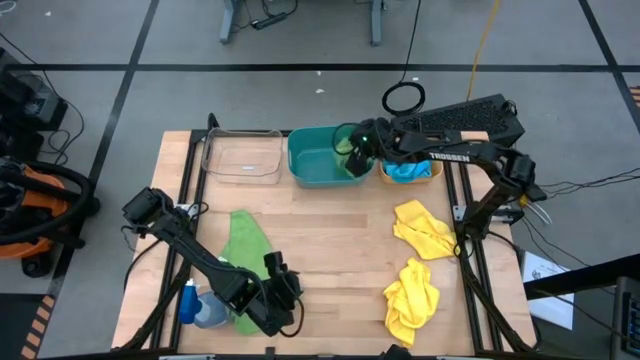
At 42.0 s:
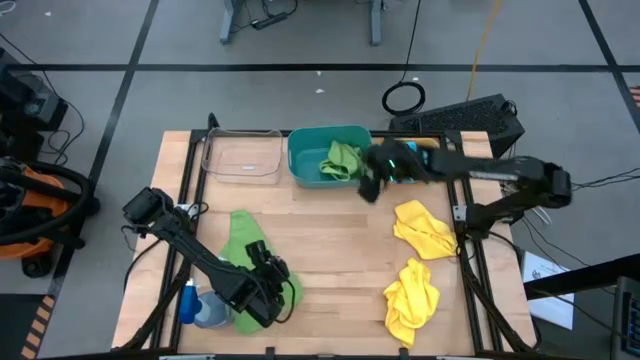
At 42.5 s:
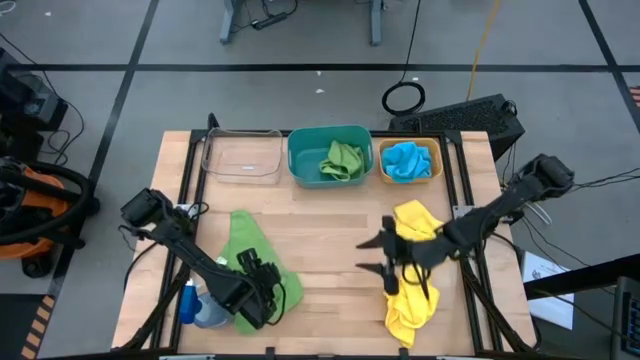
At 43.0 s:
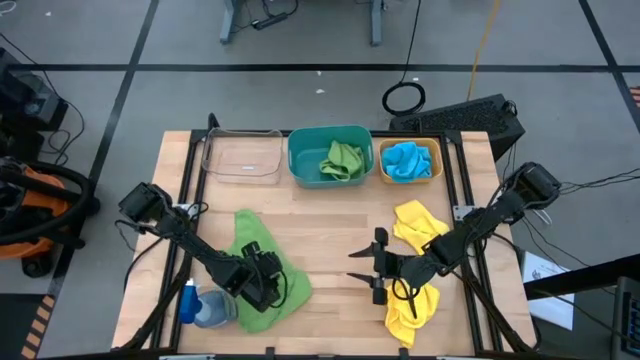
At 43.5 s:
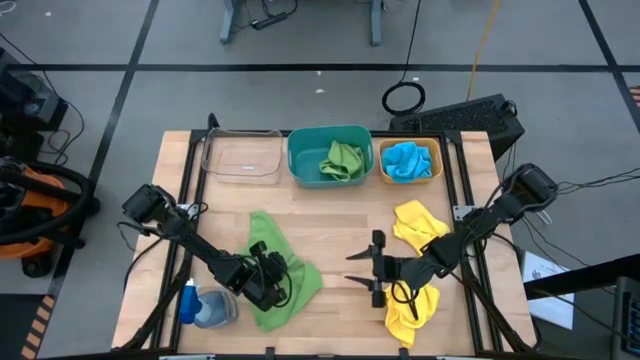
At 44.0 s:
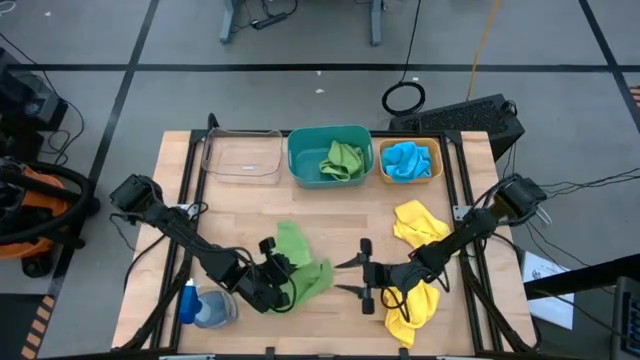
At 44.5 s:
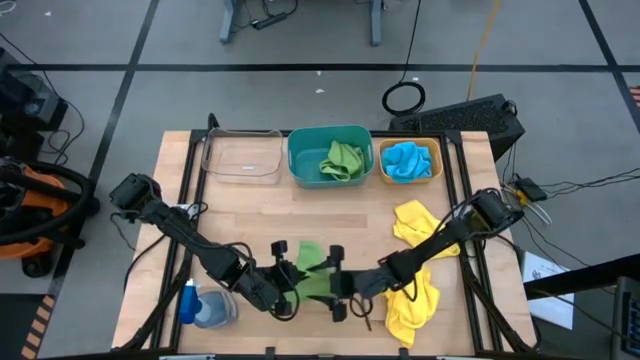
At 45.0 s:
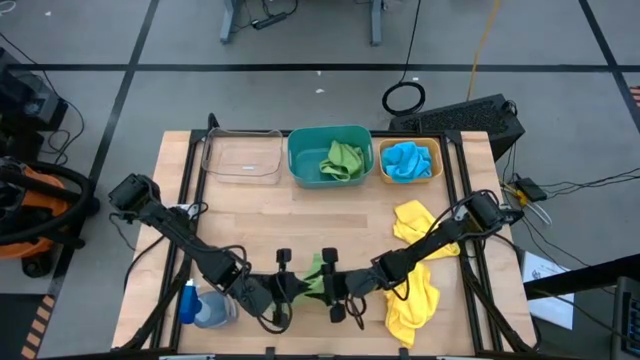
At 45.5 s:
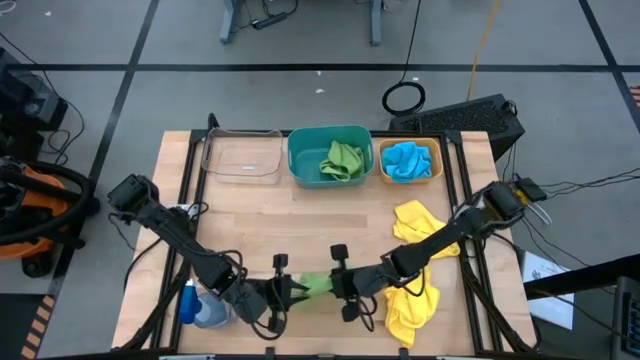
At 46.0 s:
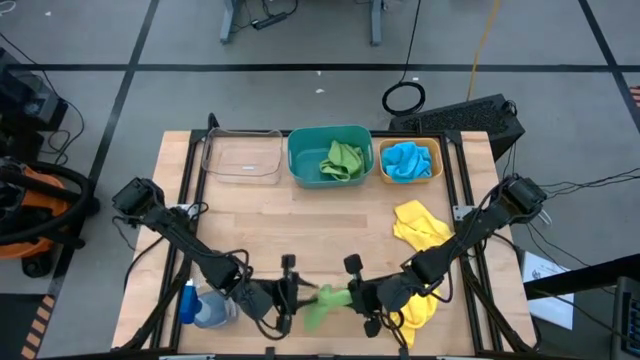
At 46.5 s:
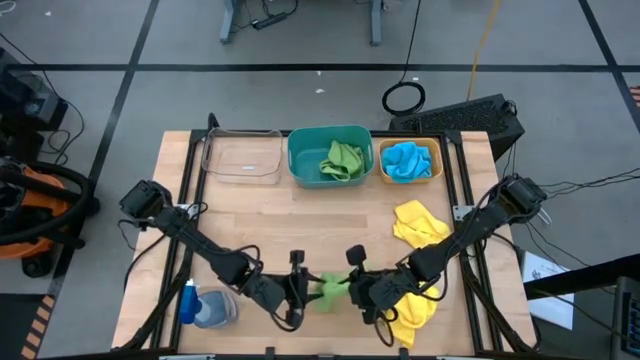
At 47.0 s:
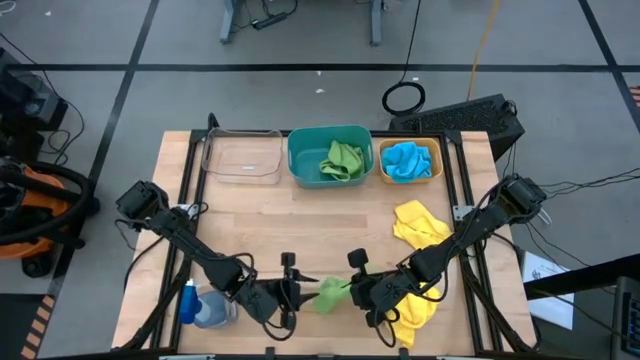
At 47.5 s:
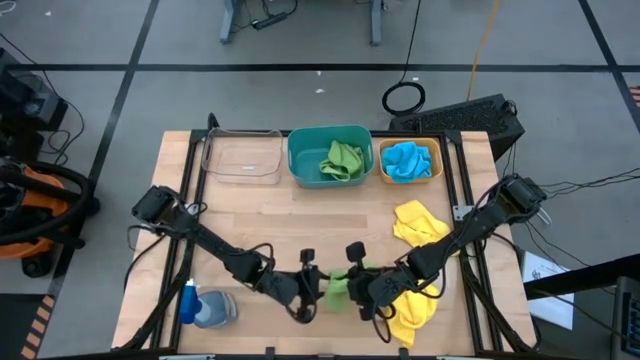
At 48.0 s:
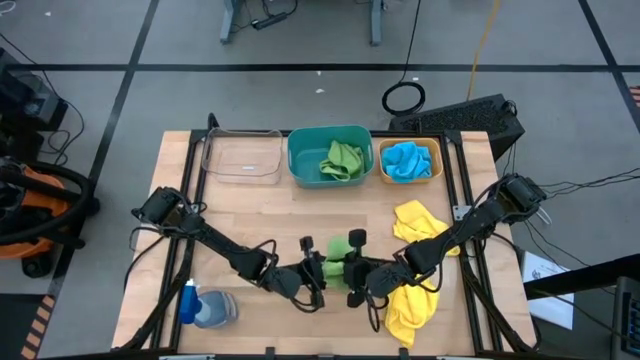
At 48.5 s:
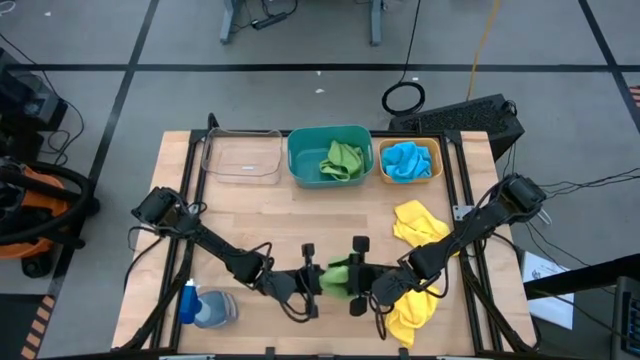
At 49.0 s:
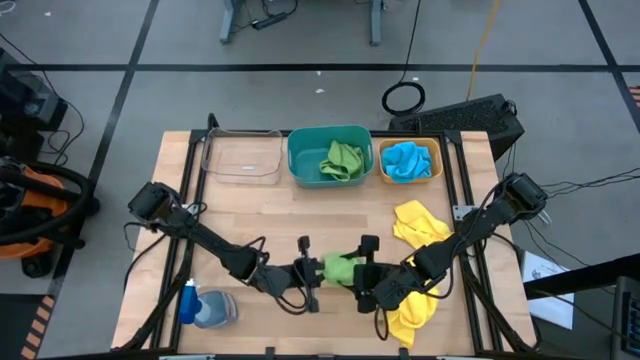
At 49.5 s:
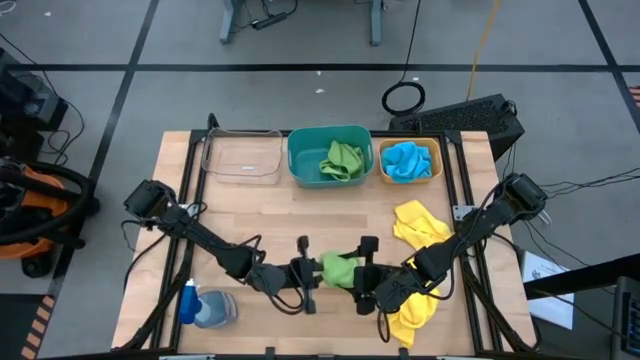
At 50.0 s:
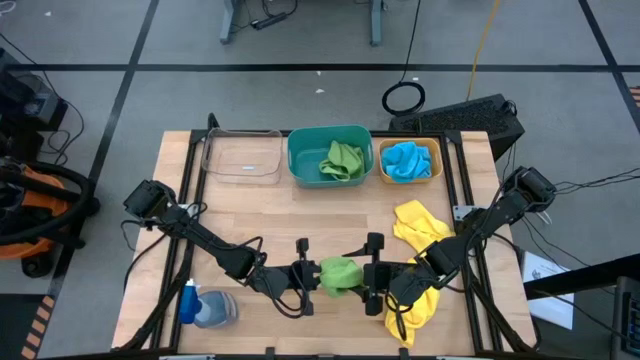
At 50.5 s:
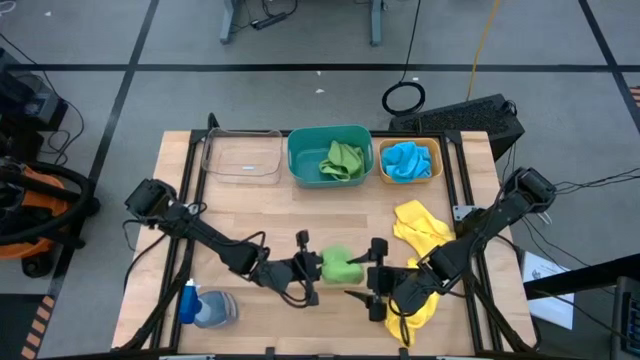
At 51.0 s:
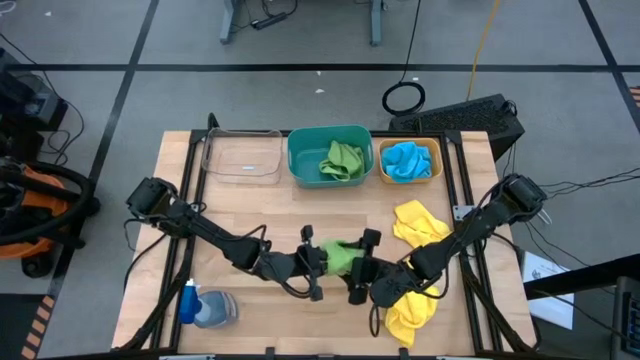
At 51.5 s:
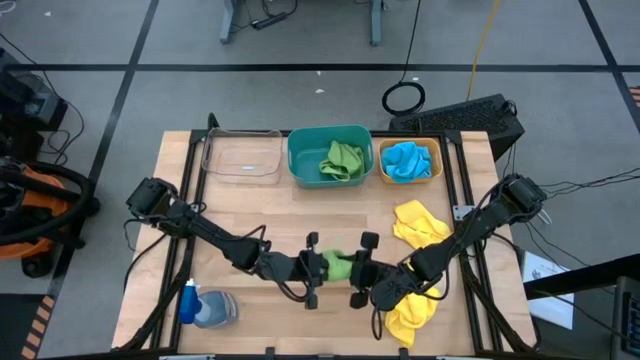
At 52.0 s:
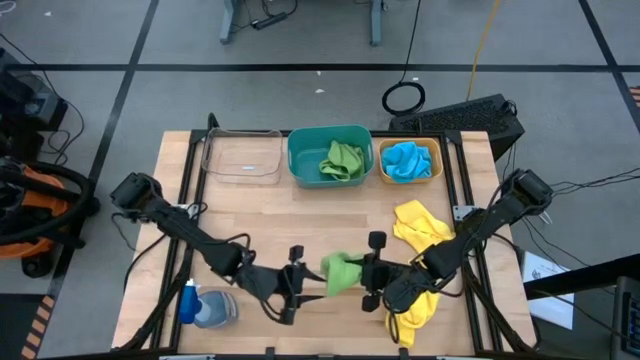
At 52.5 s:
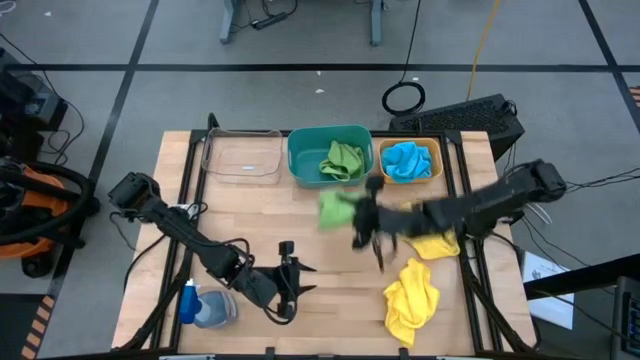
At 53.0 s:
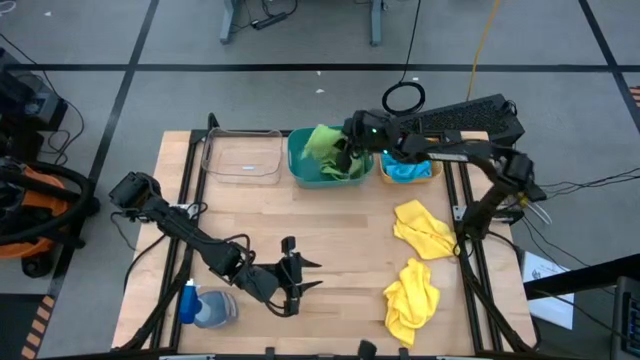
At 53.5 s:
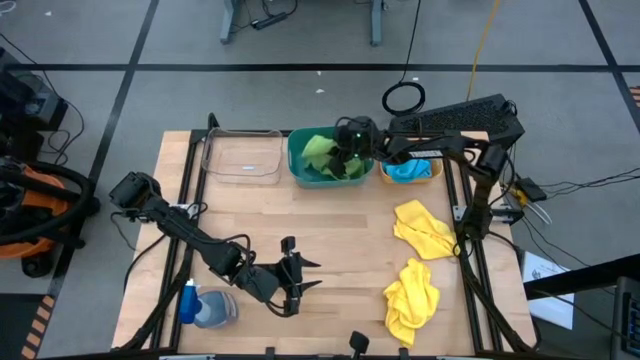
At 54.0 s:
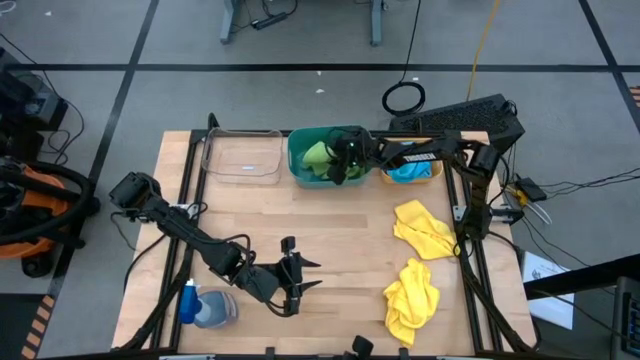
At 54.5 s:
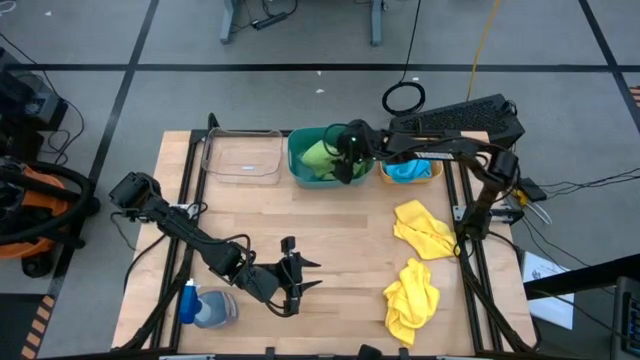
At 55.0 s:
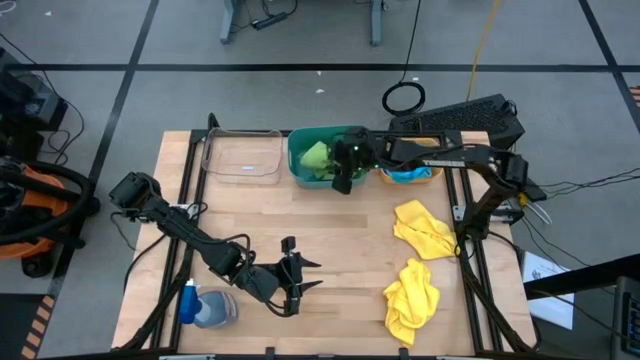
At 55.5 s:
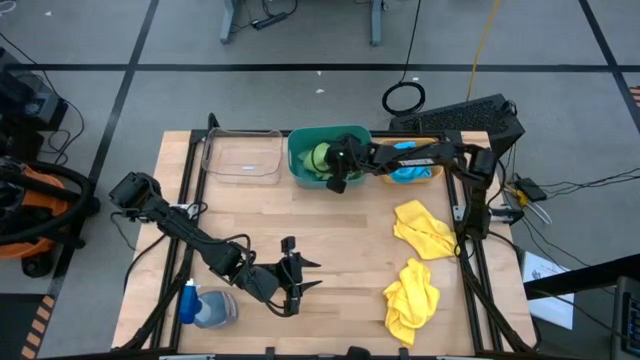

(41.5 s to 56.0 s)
Task: Sort microfiber towel by color & place in baskets
Put the green towel into the blue bin

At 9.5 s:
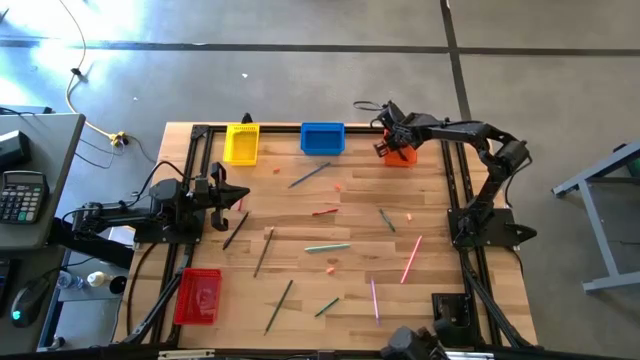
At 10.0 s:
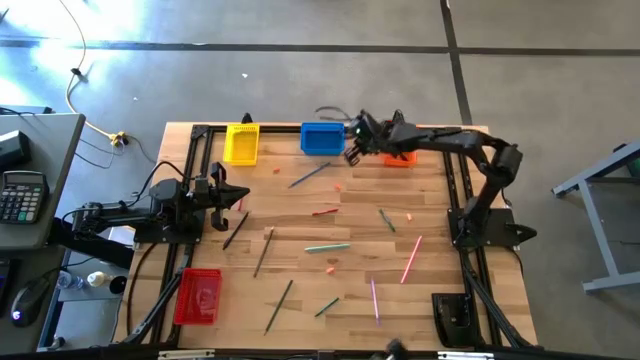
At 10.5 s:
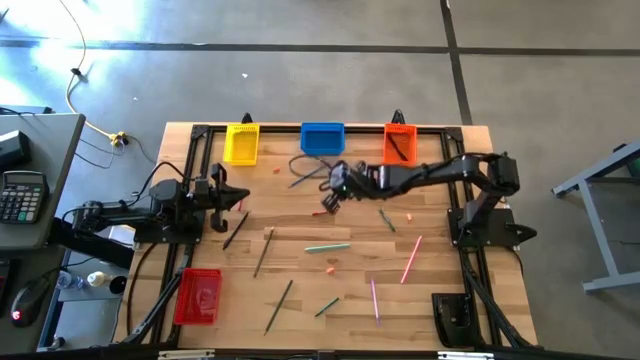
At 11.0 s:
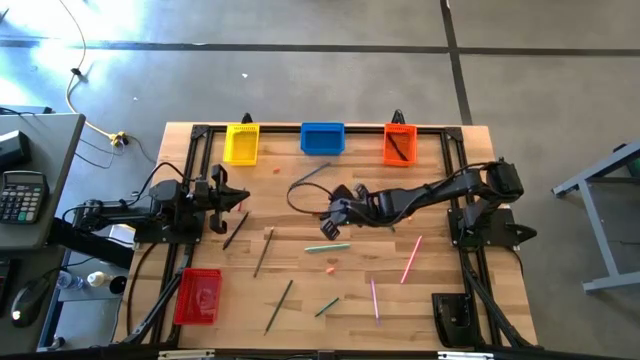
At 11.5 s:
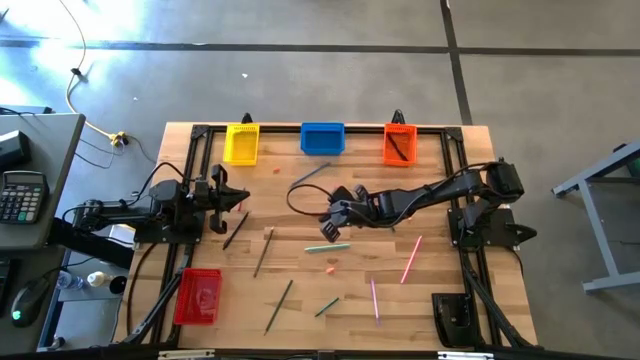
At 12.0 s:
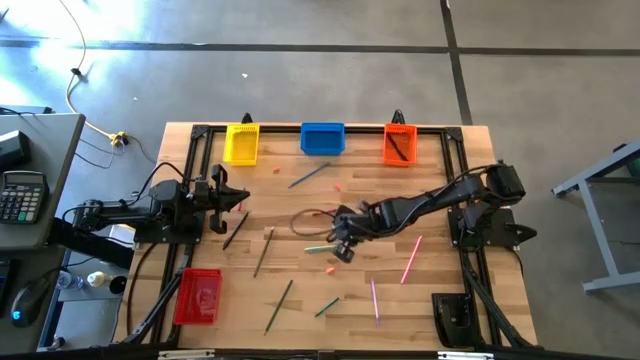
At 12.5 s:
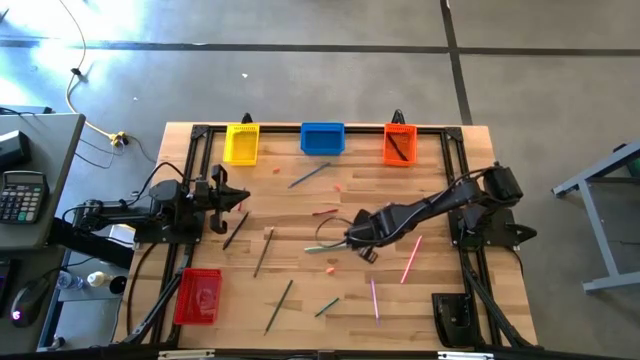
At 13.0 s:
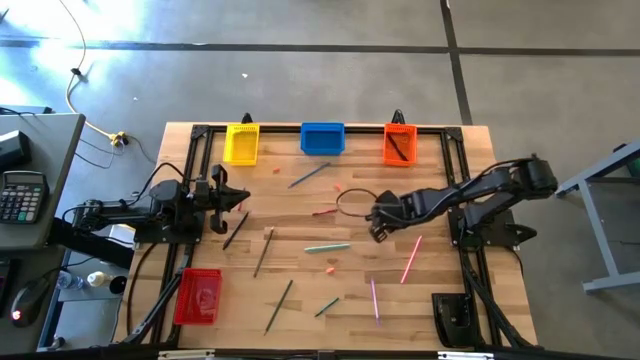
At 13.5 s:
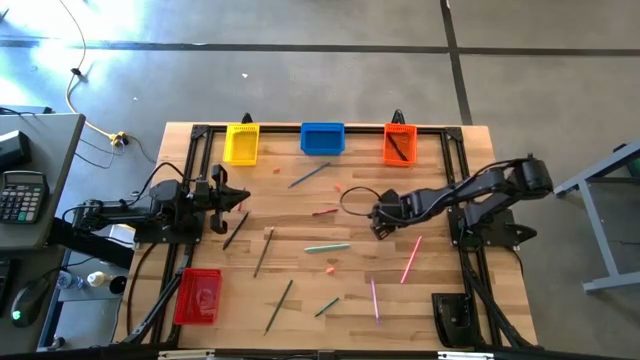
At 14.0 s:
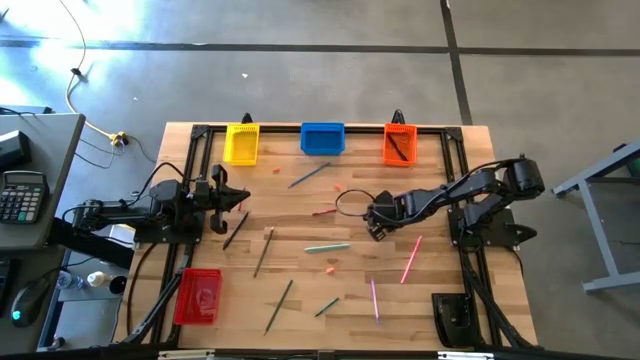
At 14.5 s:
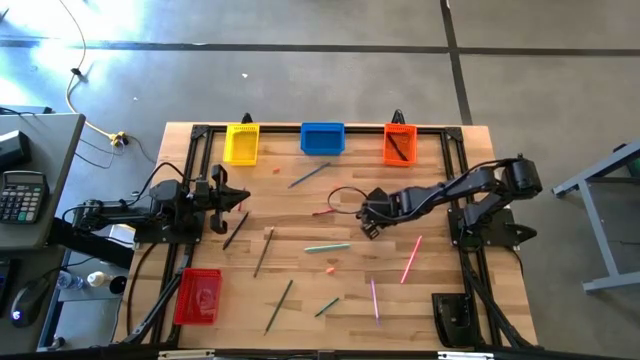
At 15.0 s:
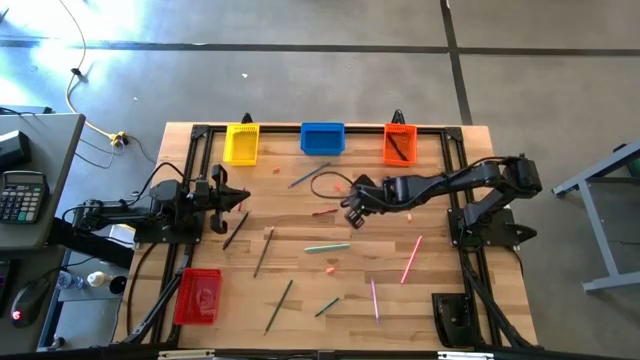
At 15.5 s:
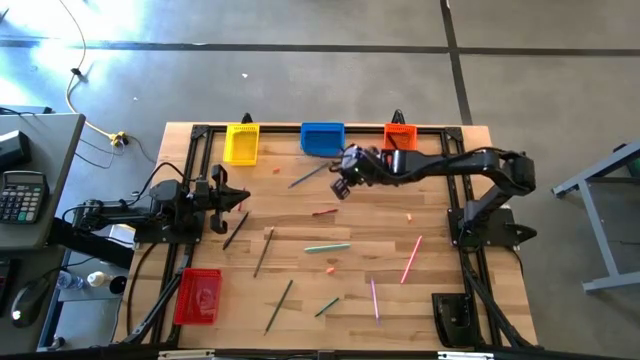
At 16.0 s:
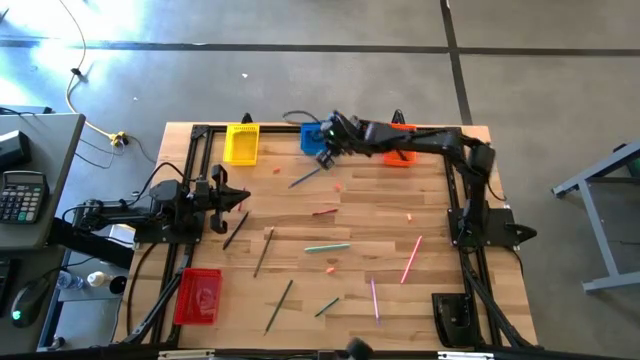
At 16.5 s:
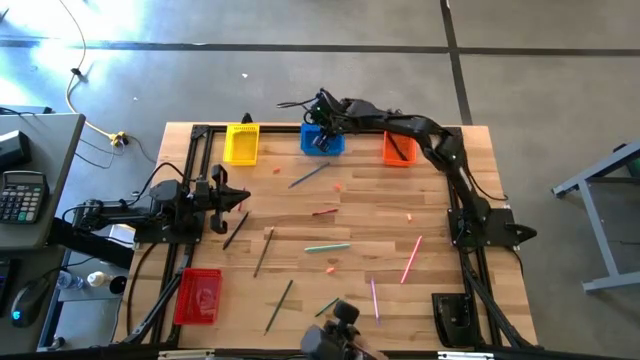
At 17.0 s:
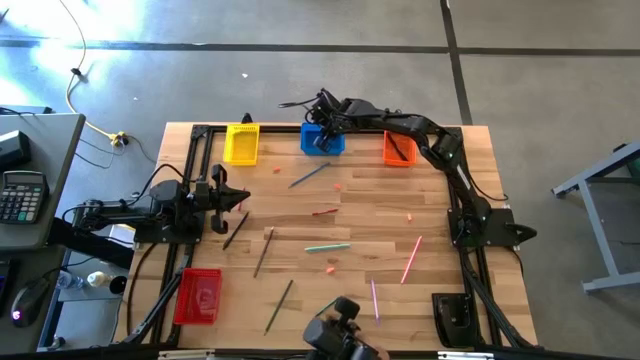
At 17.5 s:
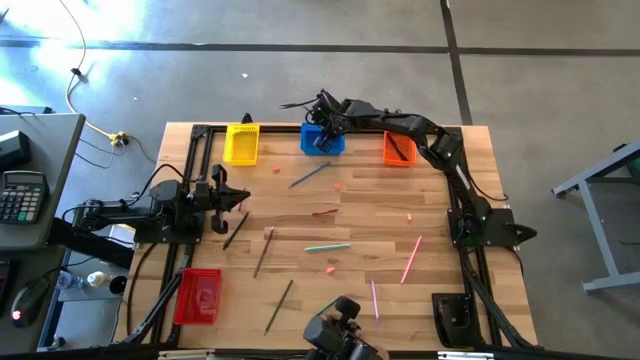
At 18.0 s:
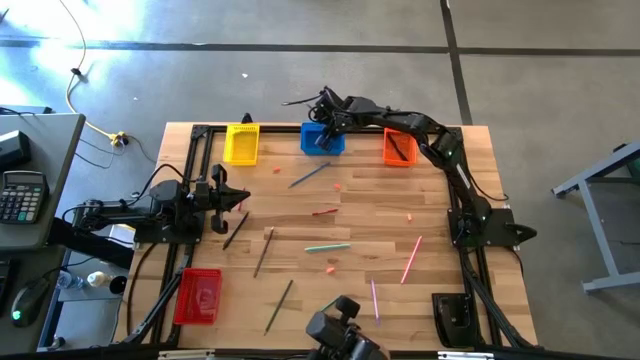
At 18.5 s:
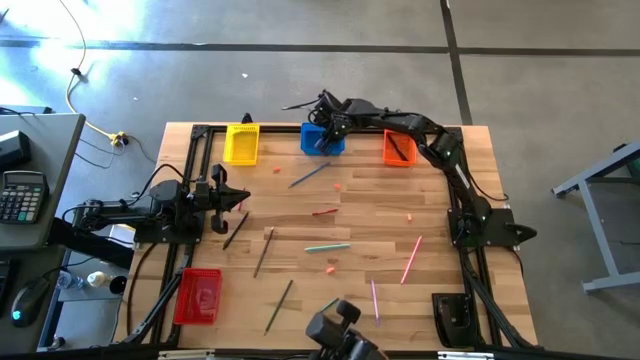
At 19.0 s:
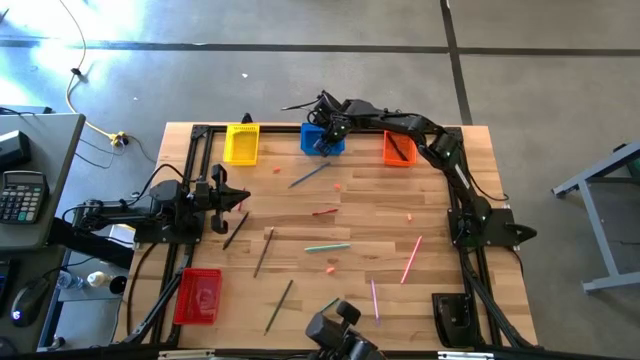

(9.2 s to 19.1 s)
Task: Sort crayons/erasers/pens/pencils in bins
Put the green crayon into the blue bin
